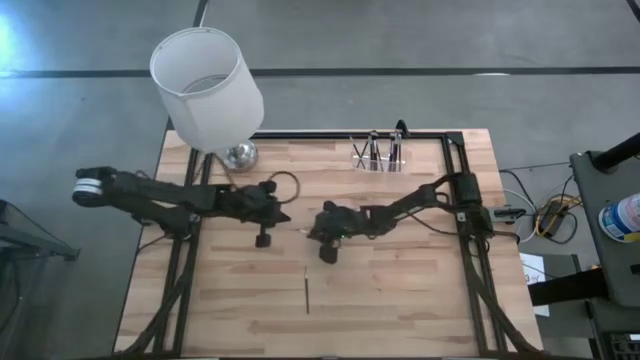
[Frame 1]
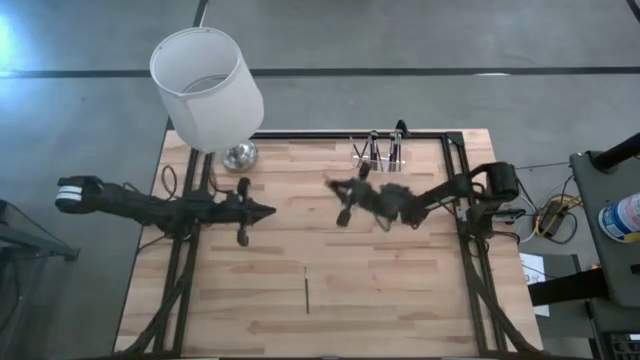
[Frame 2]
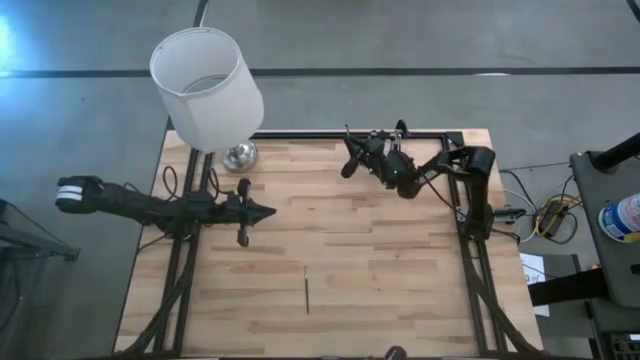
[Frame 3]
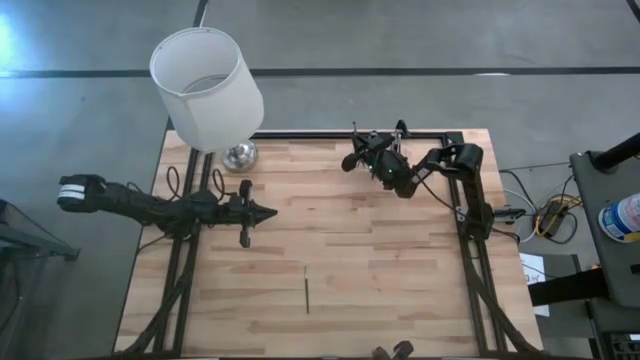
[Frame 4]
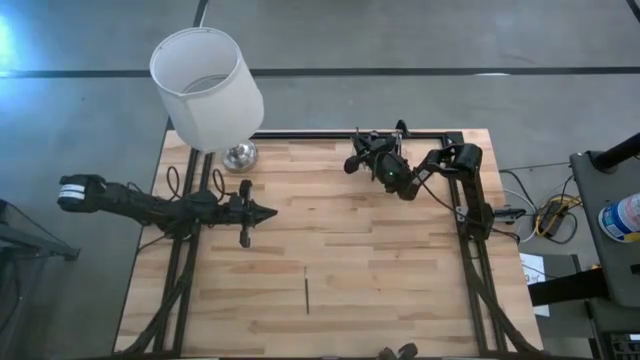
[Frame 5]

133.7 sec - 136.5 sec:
Task: Put items in baskets/containers
Put the eyeshadow brush into the transparent organizer

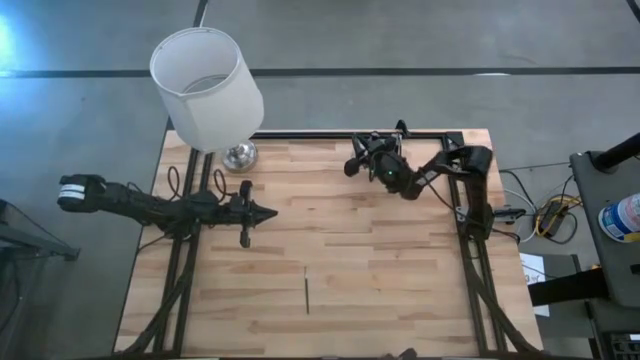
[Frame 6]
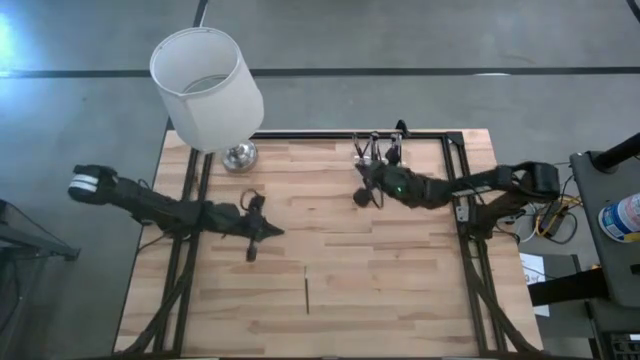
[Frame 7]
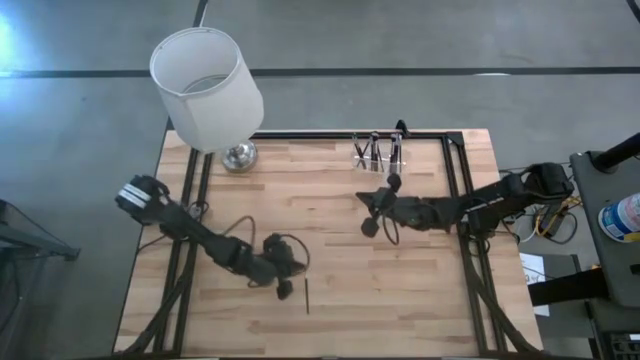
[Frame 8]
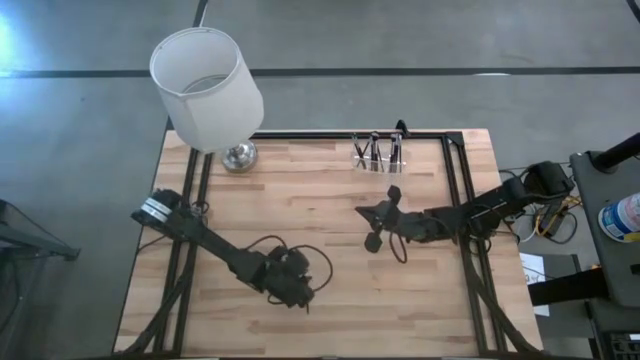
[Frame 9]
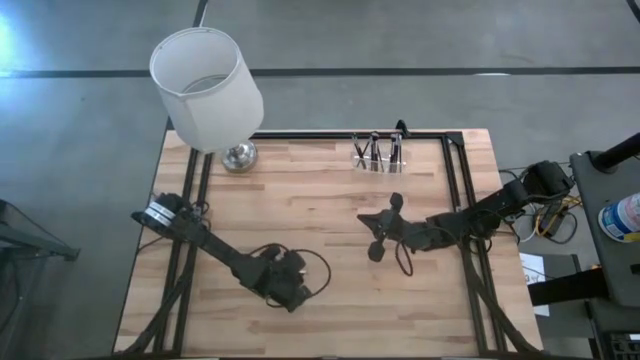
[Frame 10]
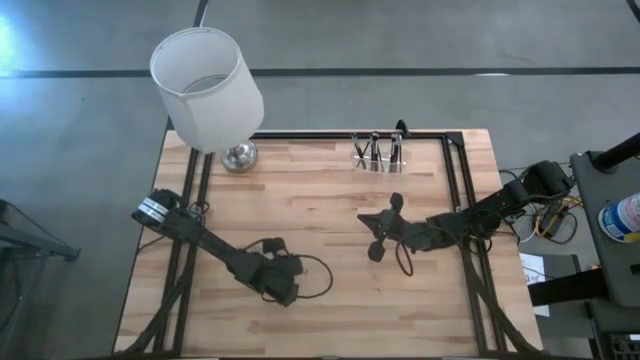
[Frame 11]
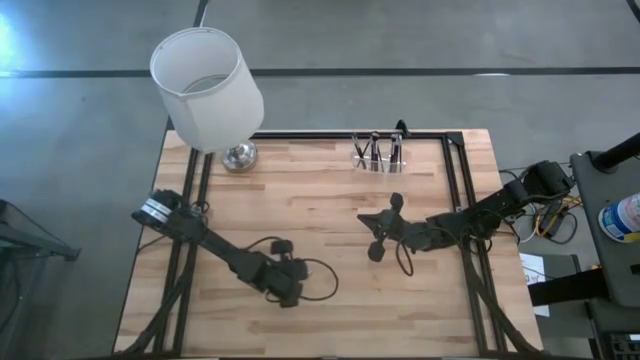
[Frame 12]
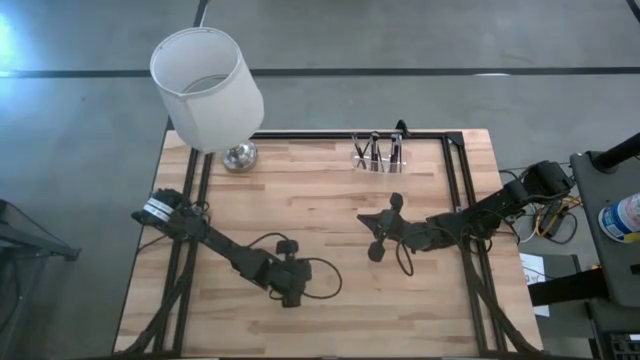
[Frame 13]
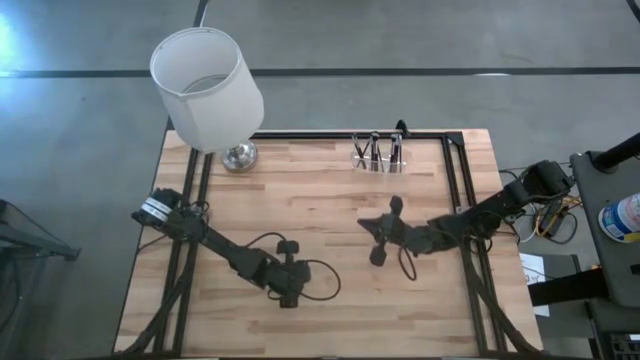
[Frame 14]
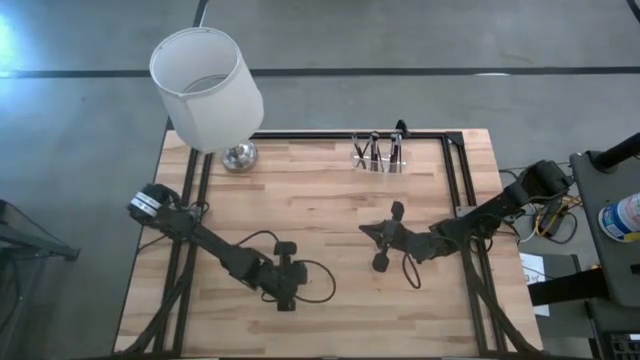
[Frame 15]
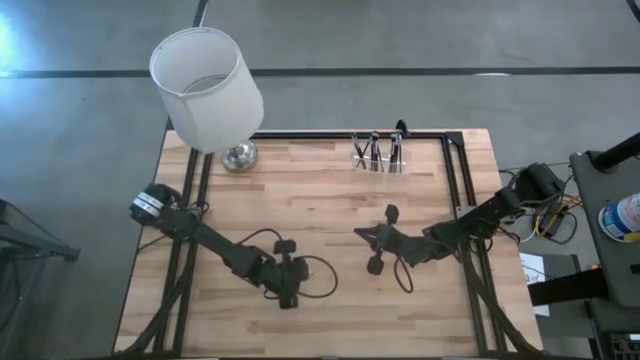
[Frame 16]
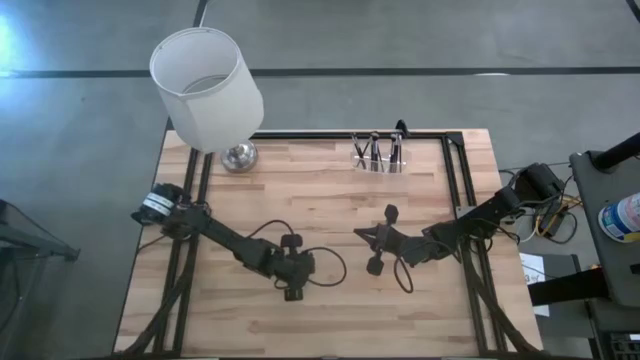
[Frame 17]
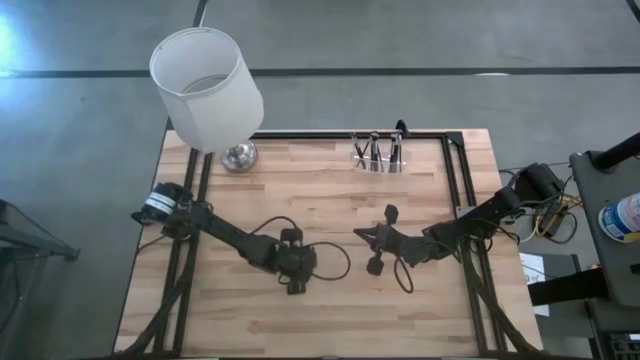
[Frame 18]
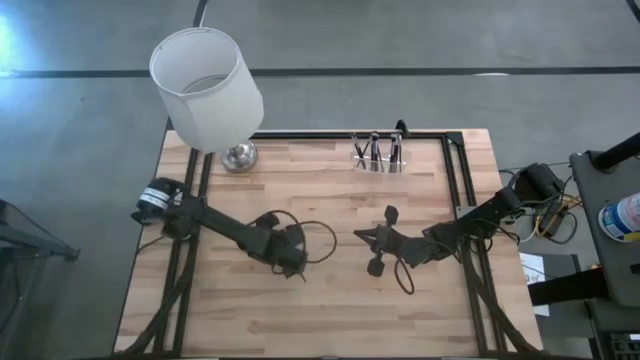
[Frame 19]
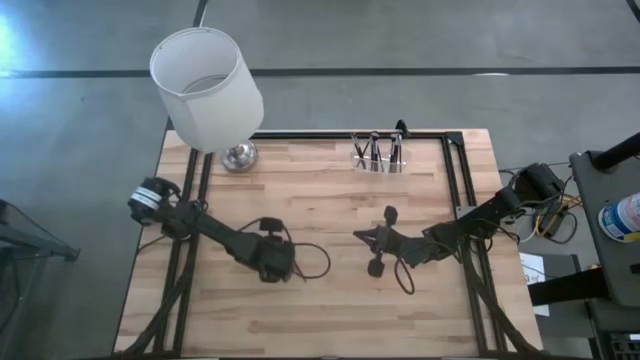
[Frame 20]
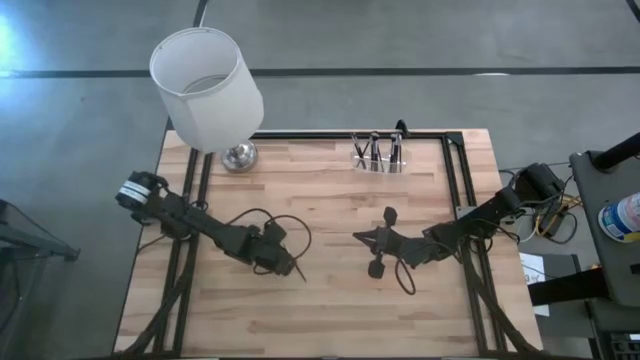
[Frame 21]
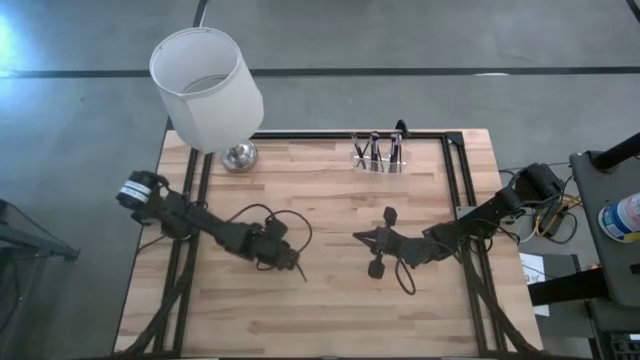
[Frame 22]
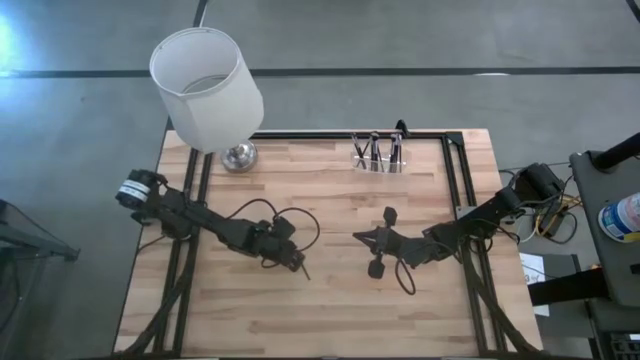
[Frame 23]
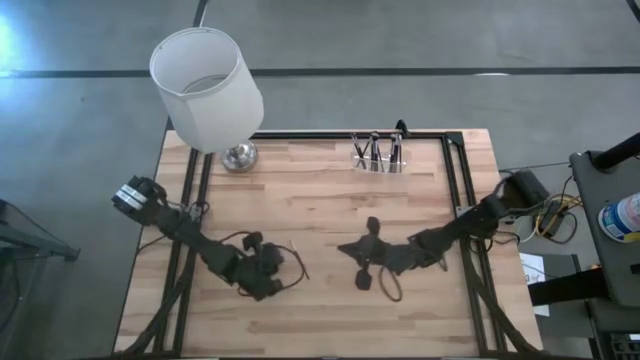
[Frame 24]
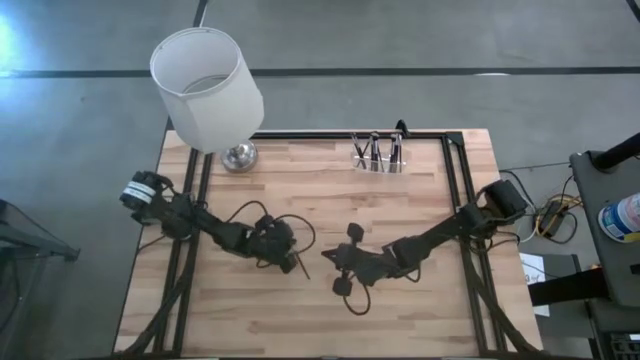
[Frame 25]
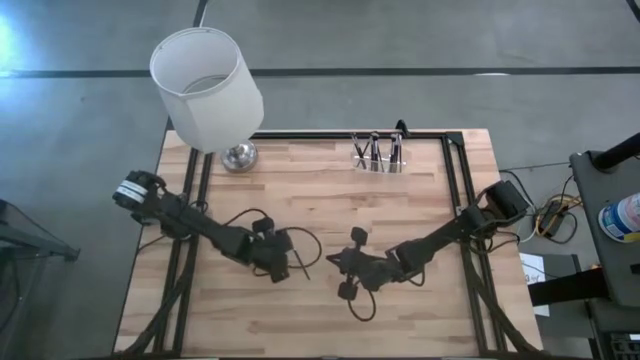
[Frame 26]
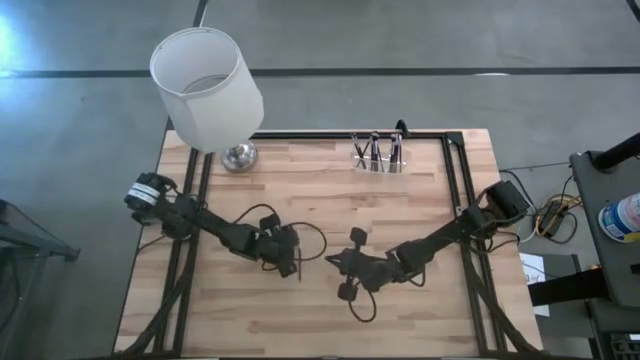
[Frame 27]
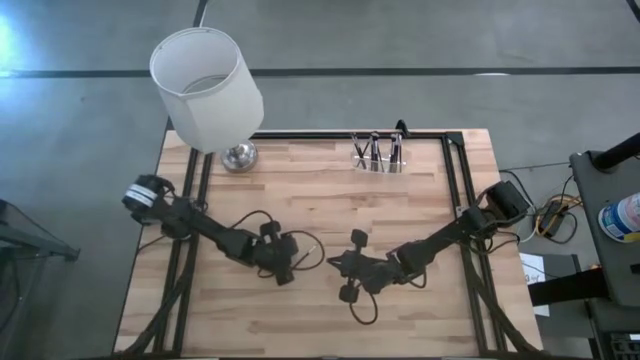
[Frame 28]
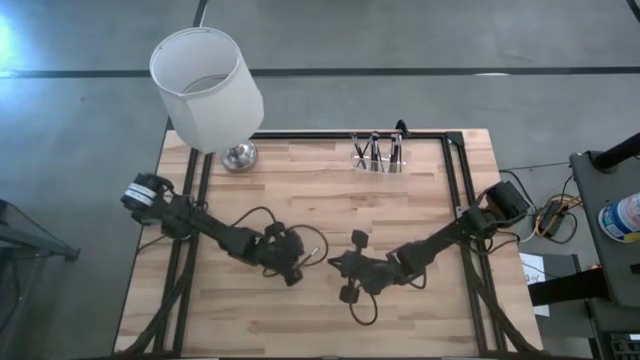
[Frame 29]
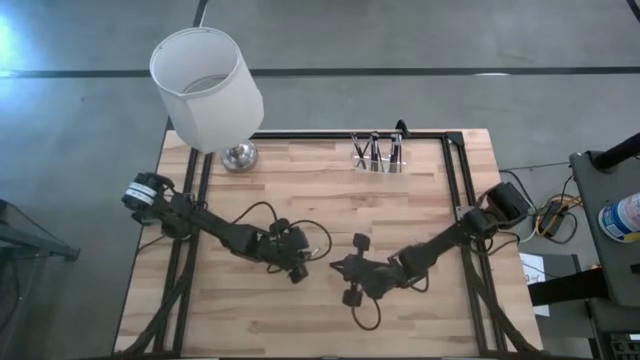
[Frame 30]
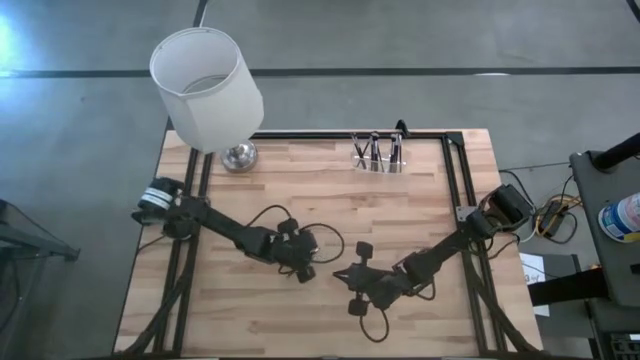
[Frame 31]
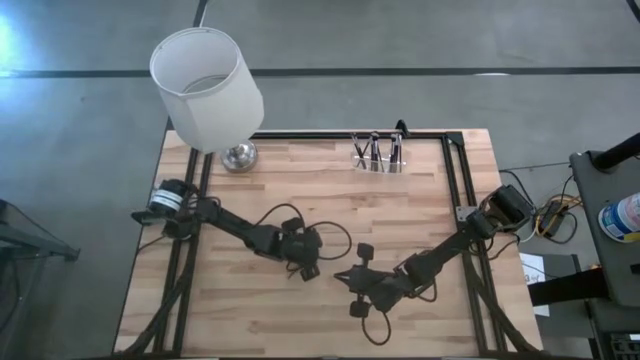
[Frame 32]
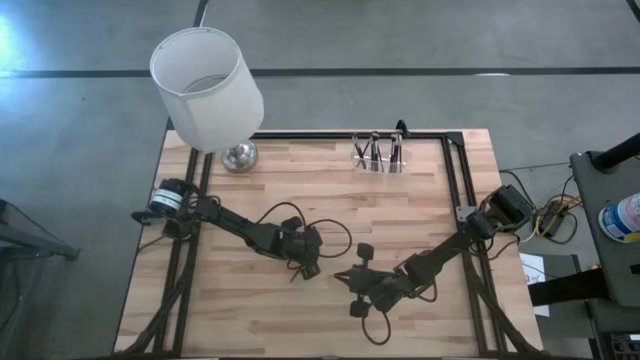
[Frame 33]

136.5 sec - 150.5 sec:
Put the eyeshadow brush into the transparent organizer

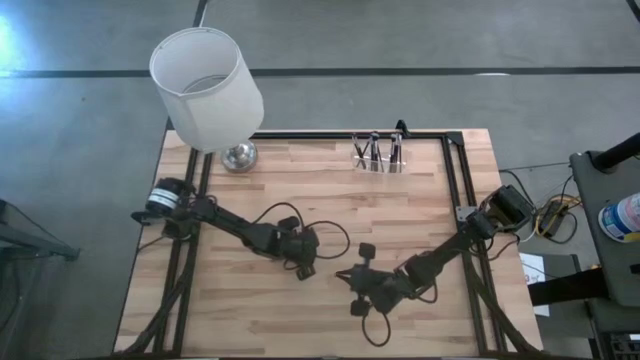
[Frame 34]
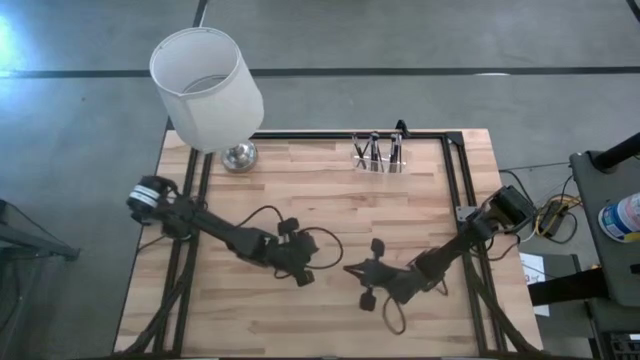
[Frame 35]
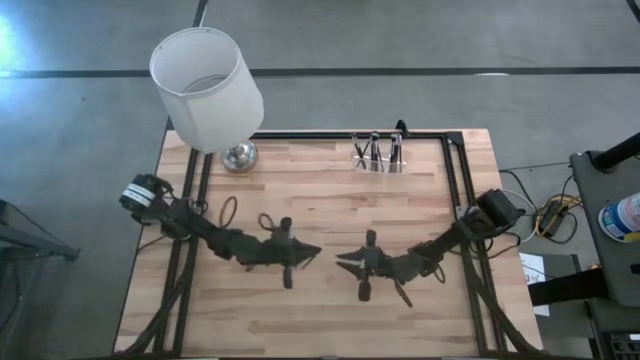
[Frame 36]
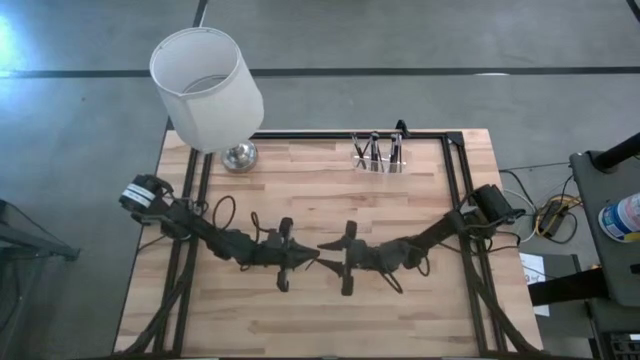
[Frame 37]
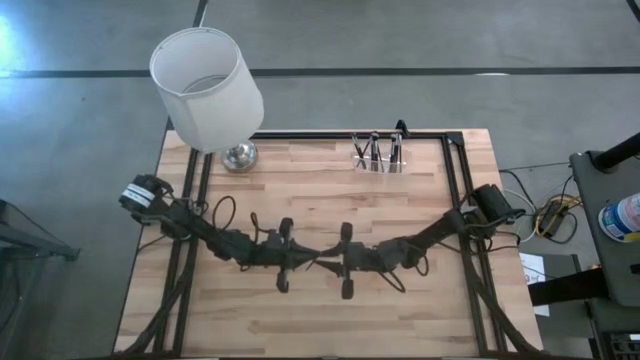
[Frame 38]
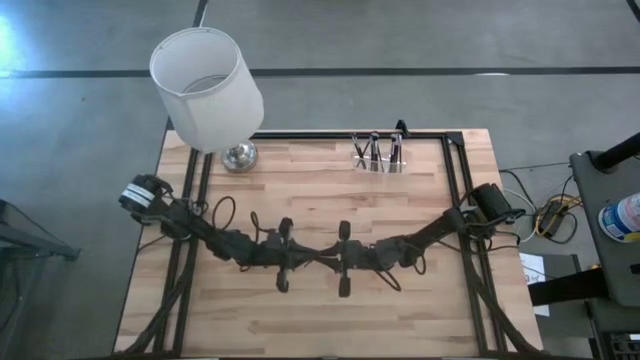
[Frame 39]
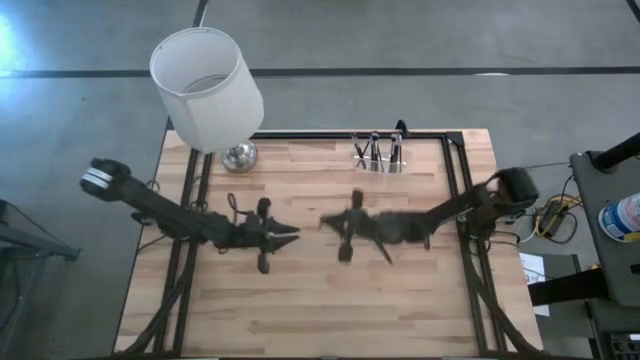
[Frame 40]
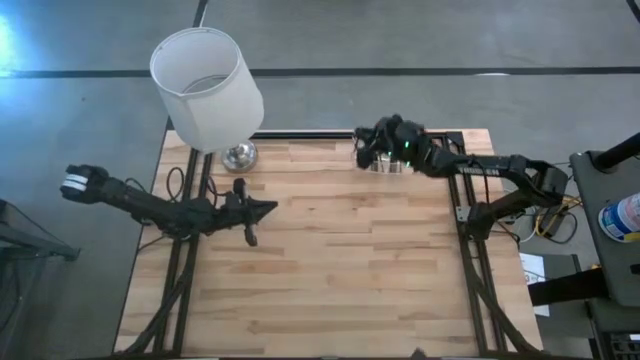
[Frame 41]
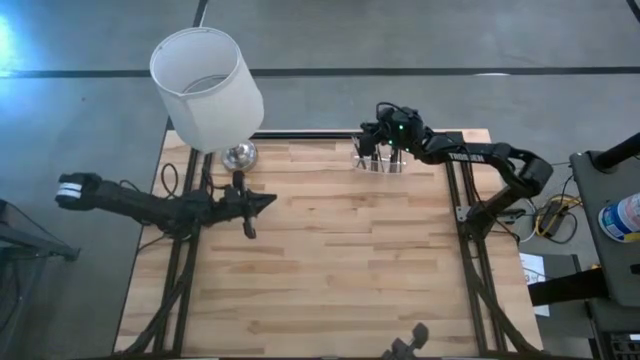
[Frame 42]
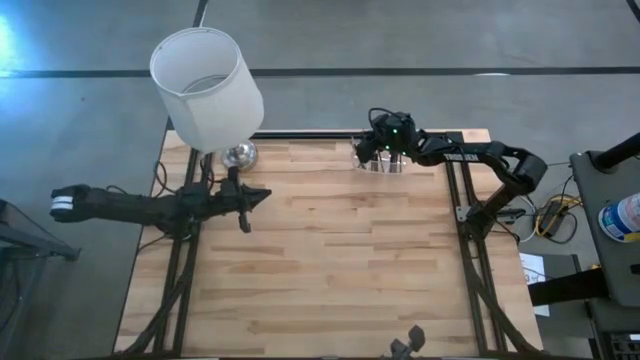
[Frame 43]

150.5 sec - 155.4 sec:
Put the eyeshadow brush into the transparent organizer
